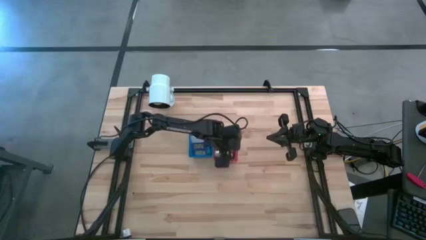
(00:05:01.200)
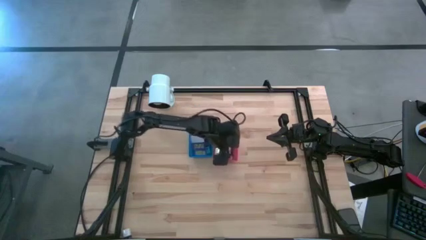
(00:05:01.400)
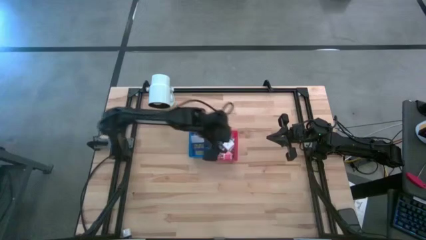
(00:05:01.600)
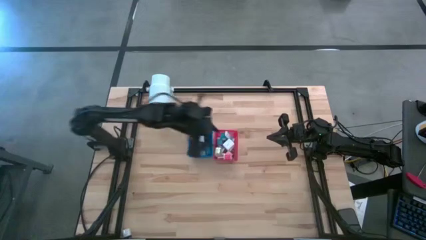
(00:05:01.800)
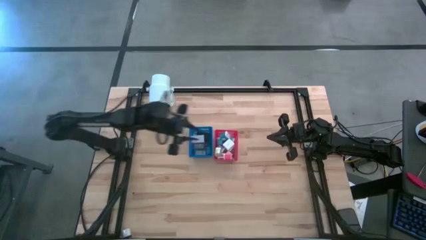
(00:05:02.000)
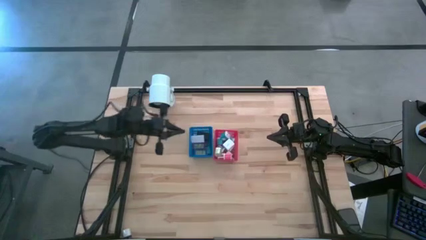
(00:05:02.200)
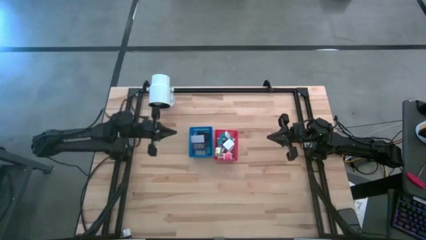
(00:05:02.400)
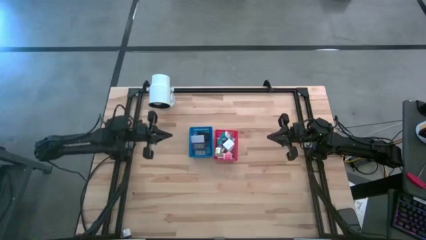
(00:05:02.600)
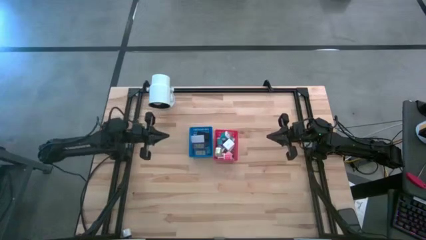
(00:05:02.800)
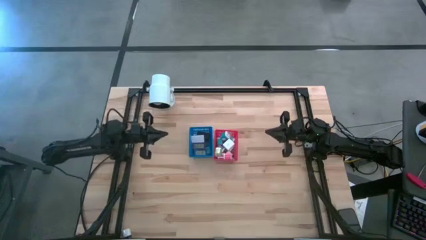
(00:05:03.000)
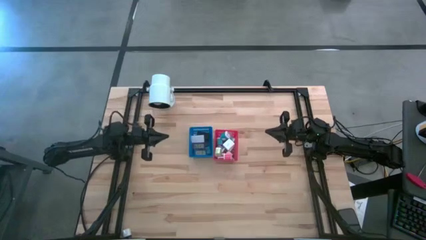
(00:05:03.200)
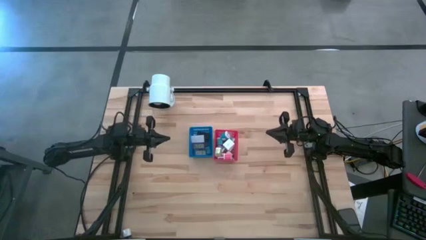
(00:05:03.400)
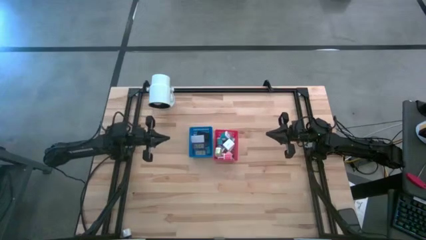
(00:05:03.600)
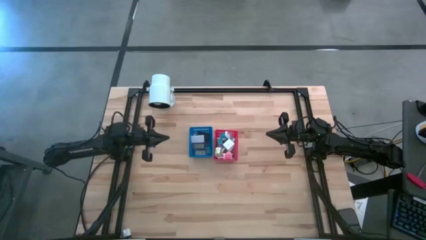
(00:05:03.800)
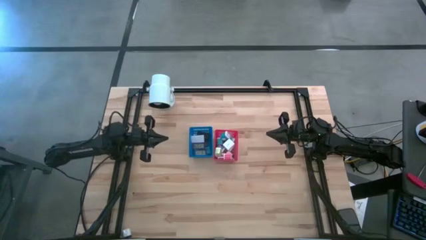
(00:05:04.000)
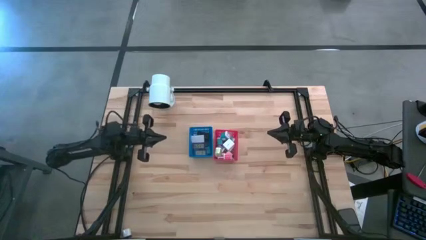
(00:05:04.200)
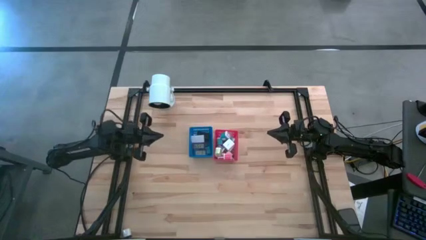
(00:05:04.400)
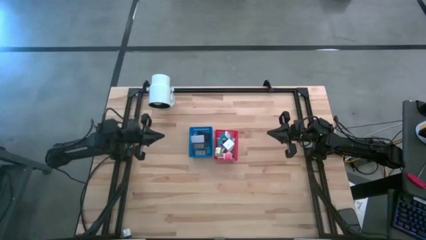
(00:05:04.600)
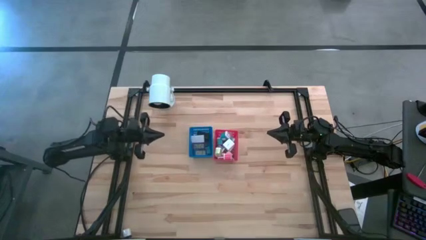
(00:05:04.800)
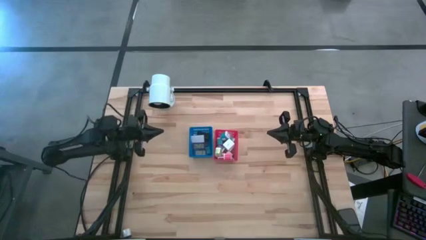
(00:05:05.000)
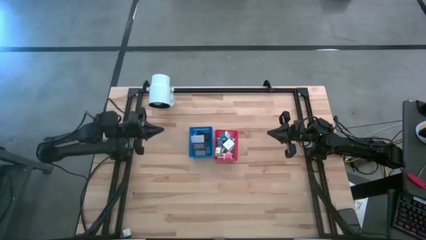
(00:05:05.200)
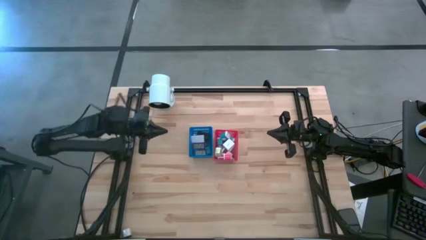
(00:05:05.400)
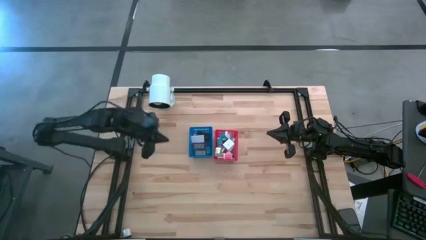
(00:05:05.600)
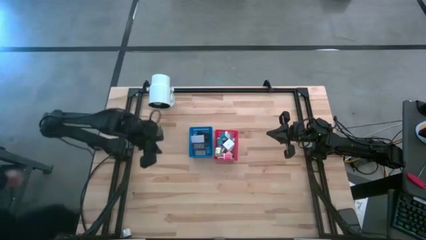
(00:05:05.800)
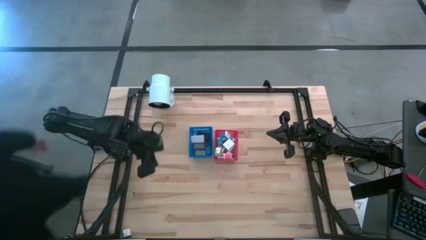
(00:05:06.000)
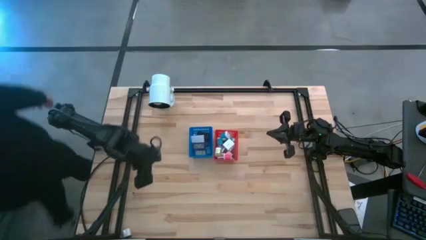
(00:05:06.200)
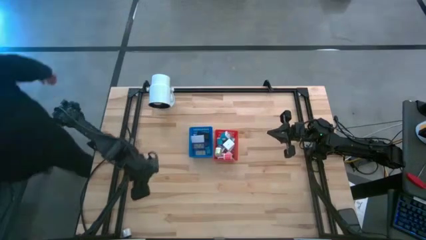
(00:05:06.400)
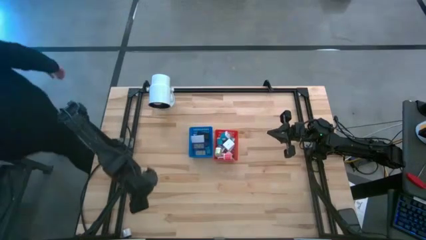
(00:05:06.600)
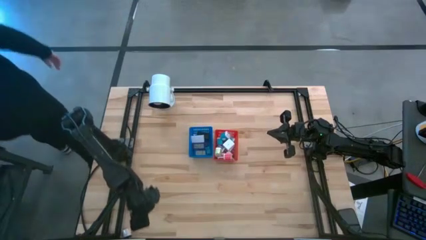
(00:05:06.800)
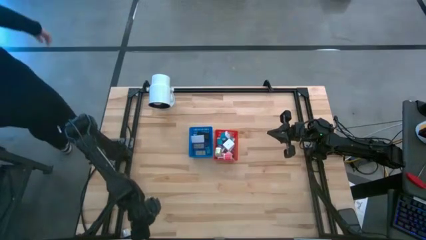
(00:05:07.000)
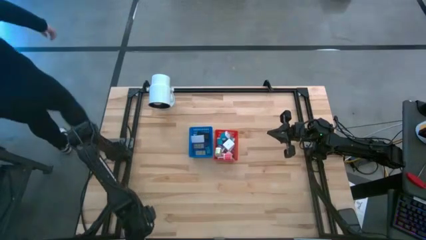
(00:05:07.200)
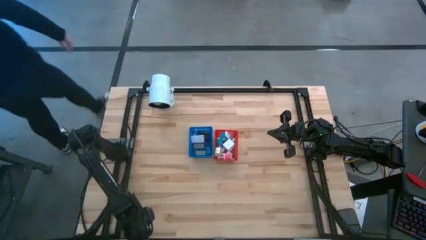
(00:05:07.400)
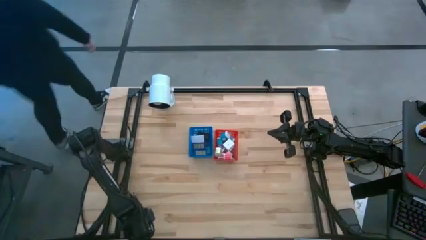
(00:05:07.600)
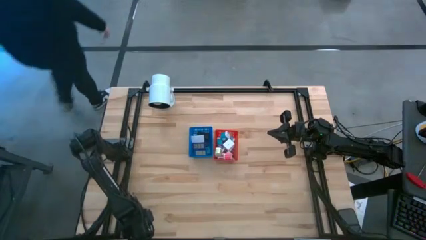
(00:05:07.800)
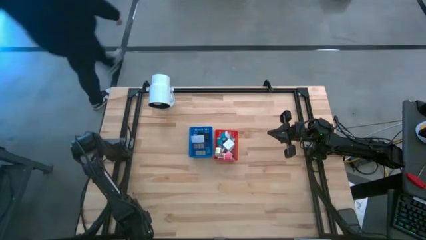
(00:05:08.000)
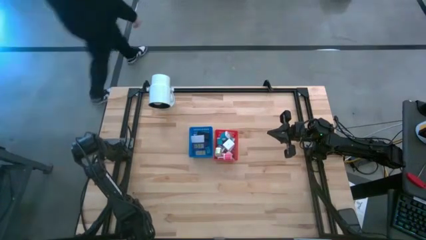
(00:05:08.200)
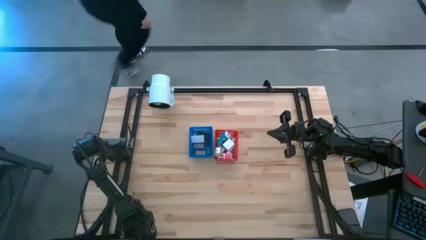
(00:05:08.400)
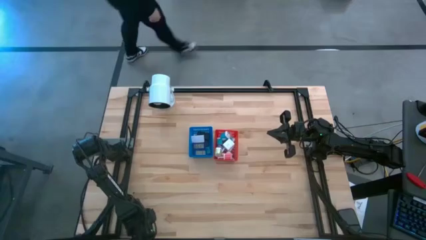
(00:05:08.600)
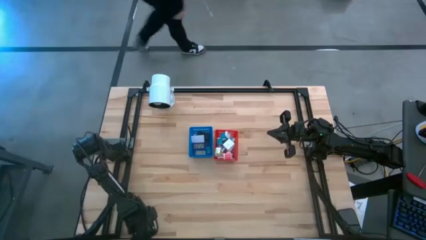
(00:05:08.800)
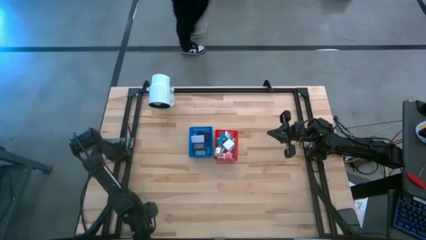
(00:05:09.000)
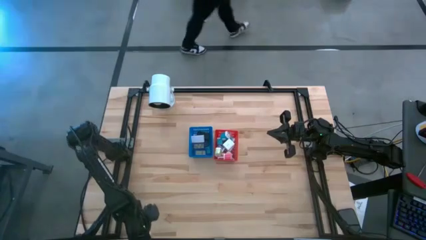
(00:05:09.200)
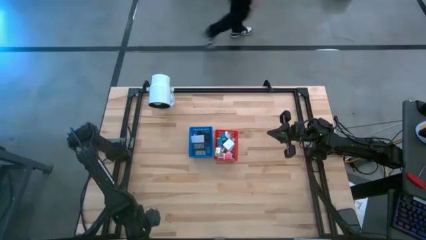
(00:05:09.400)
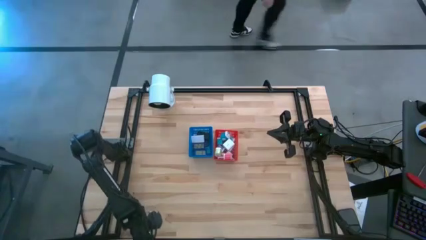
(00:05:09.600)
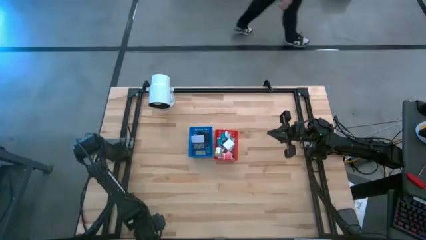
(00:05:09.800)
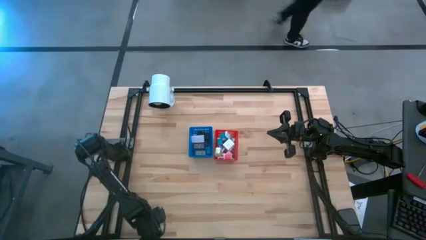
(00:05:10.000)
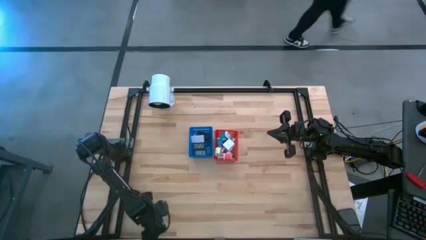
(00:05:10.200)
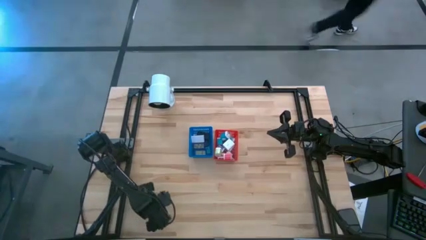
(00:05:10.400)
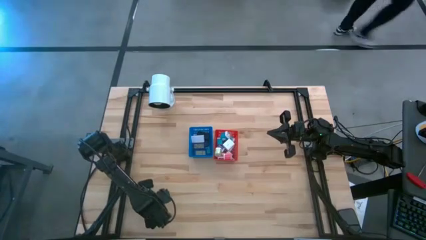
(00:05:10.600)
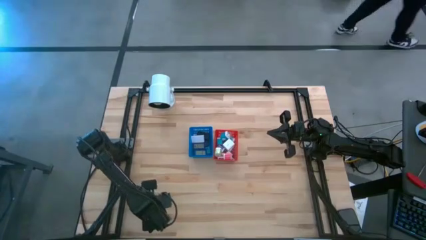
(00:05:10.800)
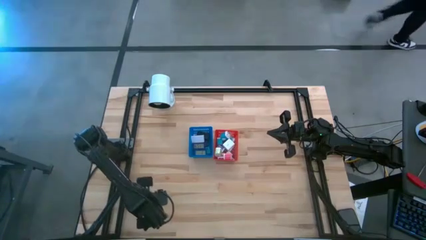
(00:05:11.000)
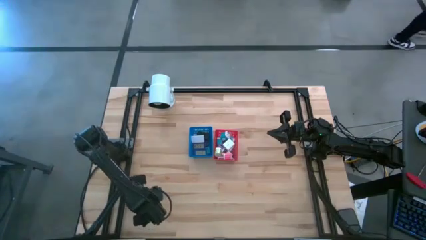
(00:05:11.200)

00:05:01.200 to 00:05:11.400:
Task: Pick & Place Office items
Put the white charger adapter into the red bin

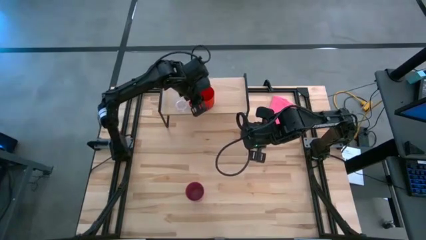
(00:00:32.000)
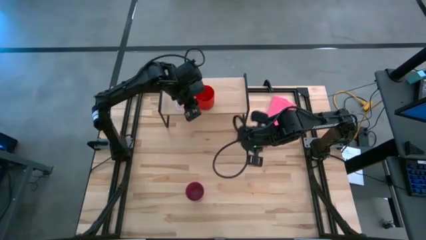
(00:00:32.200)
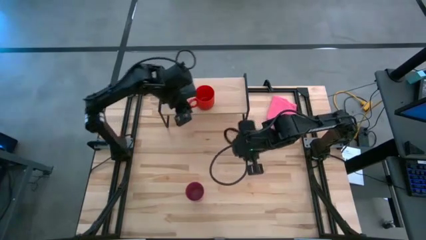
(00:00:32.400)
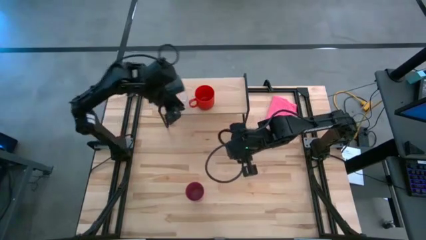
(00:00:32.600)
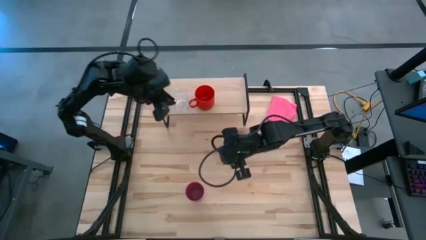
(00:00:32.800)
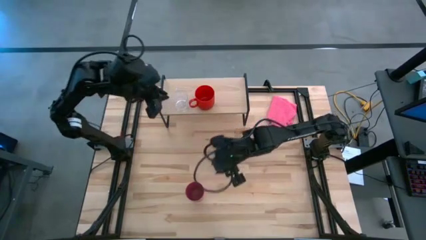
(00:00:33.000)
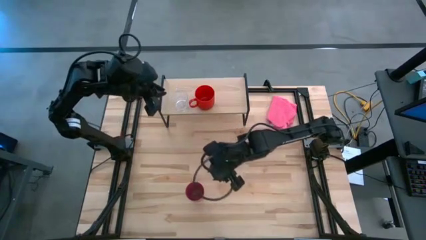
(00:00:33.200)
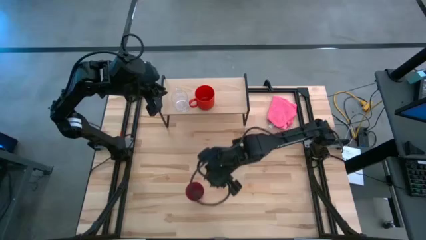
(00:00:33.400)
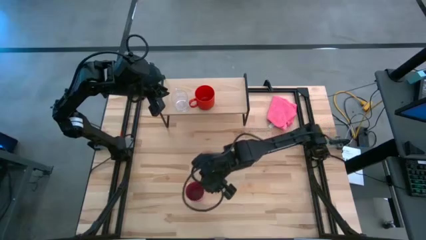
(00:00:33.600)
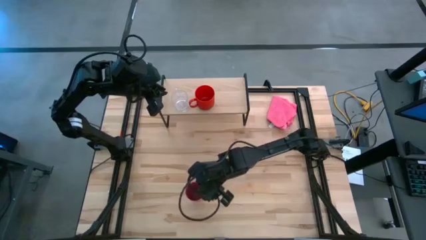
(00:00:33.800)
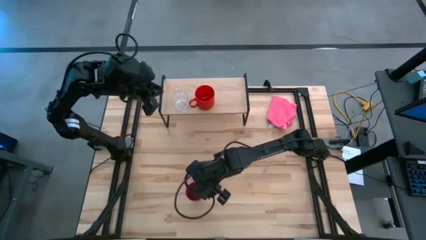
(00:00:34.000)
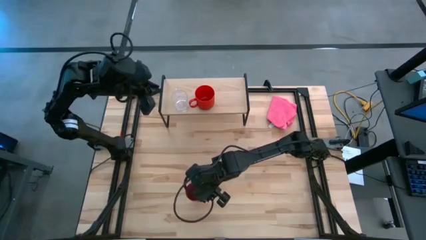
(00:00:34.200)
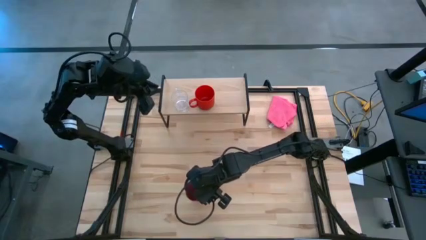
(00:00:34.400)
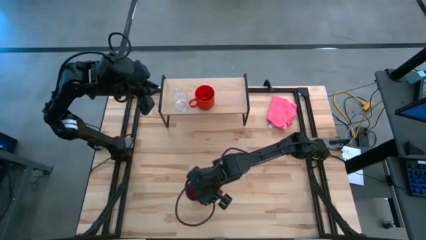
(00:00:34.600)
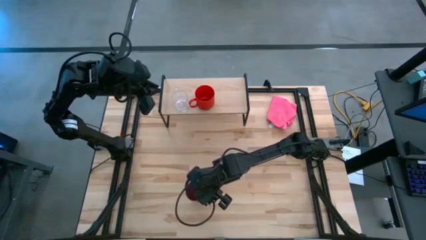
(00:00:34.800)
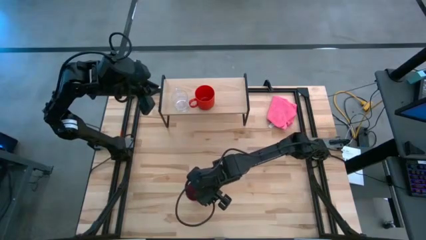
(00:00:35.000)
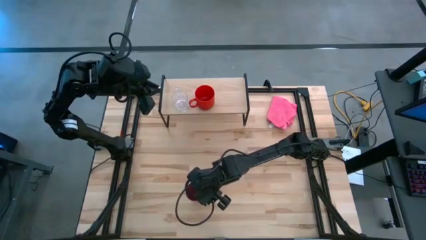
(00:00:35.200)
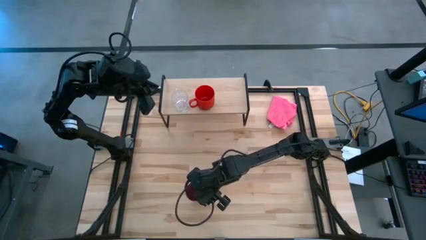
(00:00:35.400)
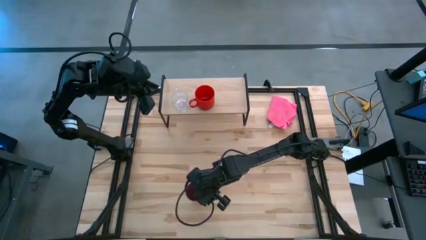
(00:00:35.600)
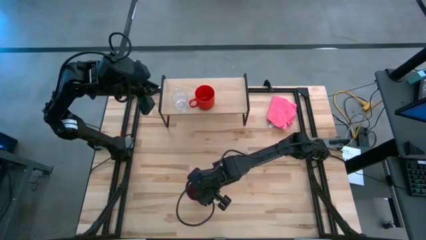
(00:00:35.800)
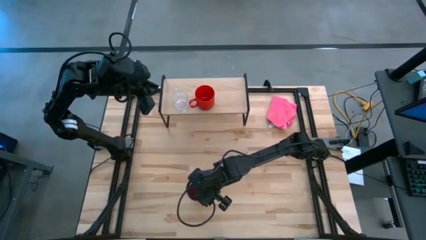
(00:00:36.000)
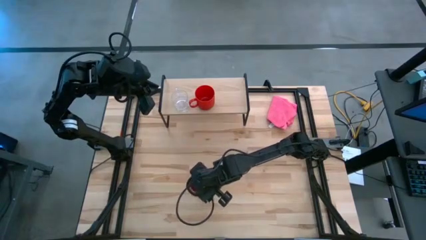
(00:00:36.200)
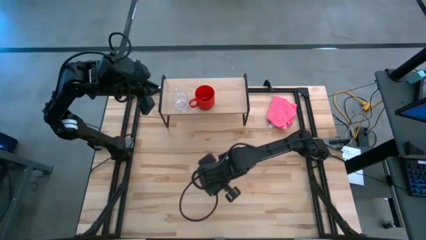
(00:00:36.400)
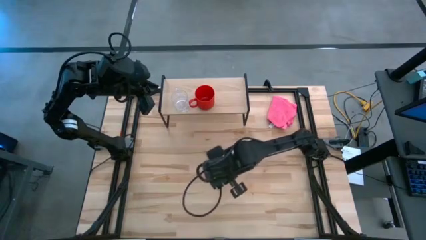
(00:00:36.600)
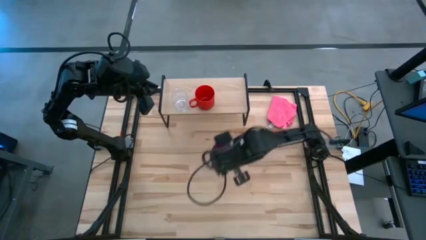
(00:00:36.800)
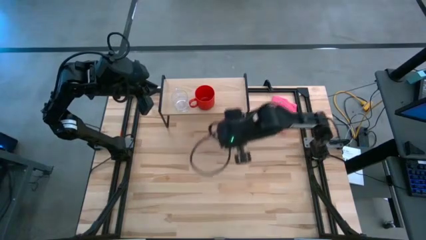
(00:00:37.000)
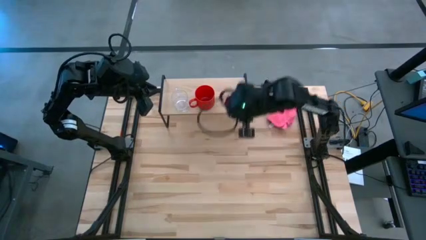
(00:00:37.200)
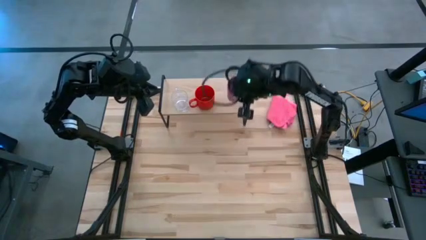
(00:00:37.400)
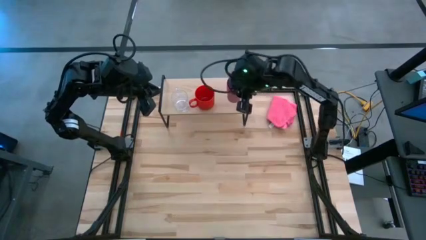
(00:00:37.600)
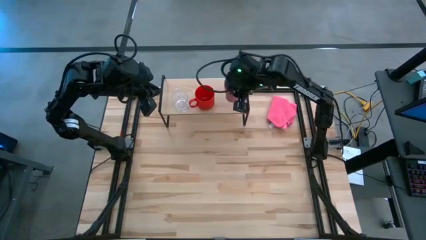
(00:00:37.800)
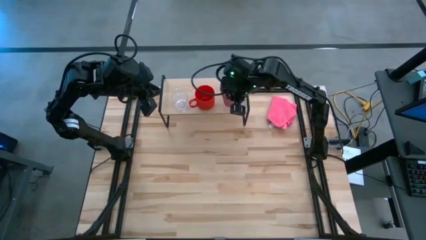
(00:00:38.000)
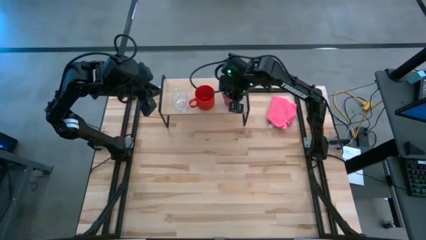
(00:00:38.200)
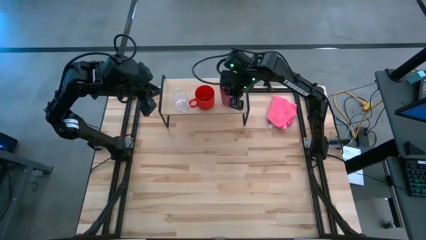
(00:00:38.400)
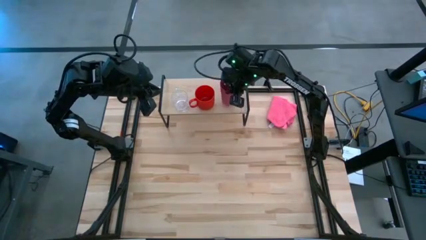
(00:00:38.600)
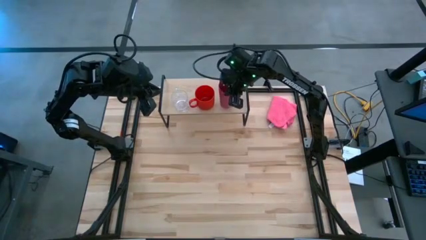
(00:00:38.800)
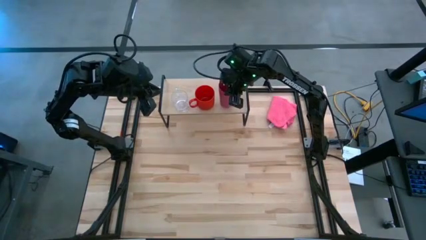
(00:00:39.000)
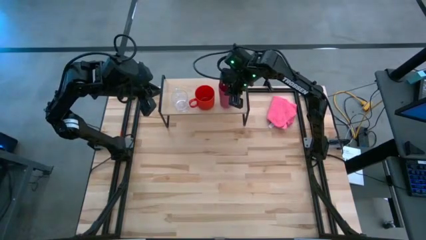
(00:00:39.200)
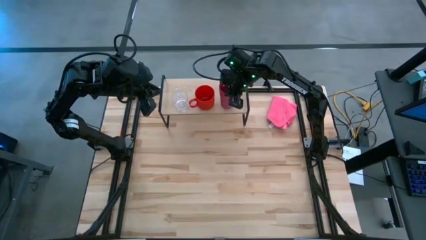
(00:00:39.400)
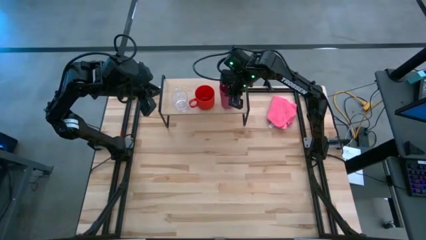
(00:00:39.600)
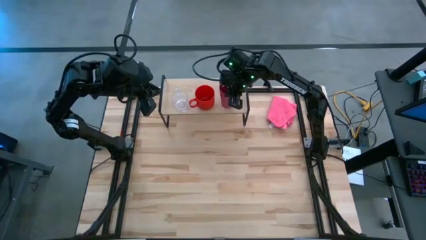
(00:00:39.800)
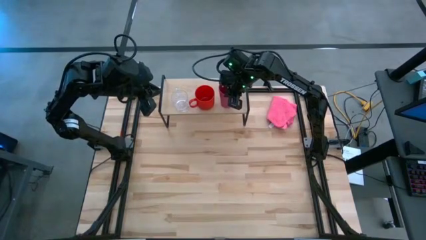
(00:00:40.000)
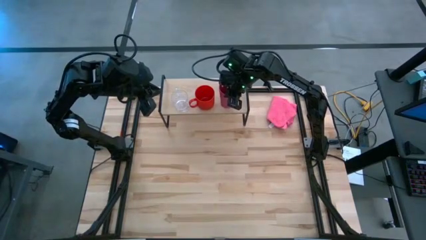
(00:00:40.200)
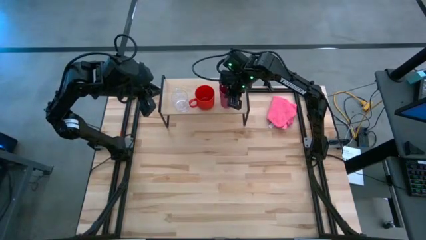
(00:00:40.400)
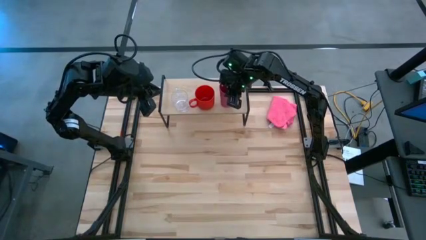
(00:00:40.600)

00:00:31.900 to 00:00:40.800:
Task: Stack small to large cups/mugs on shelf
Put the pink cup on the shelf
